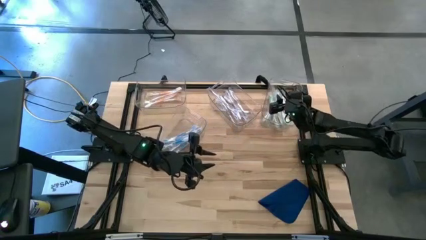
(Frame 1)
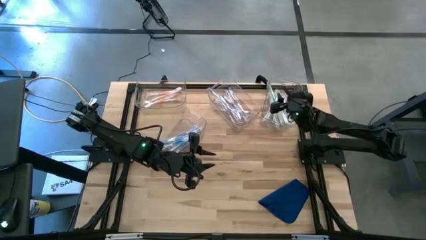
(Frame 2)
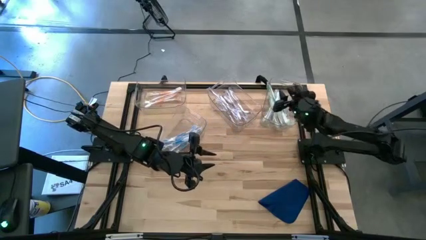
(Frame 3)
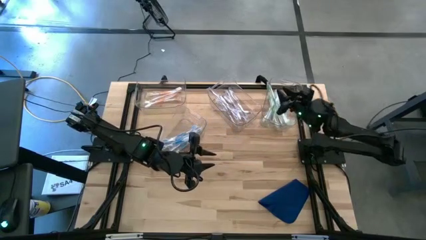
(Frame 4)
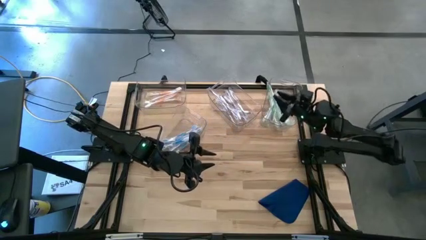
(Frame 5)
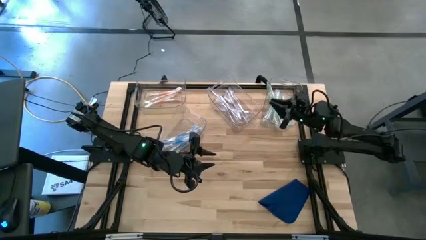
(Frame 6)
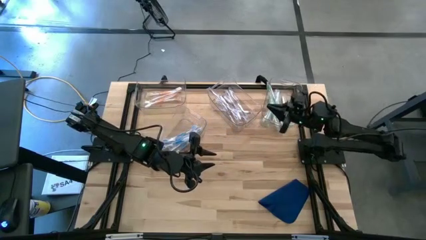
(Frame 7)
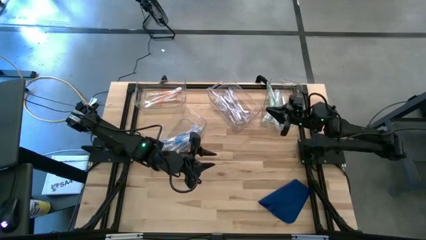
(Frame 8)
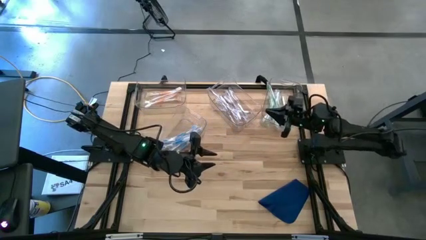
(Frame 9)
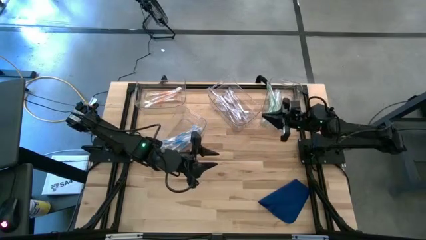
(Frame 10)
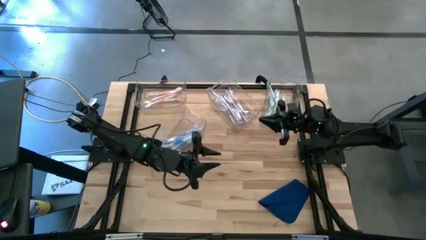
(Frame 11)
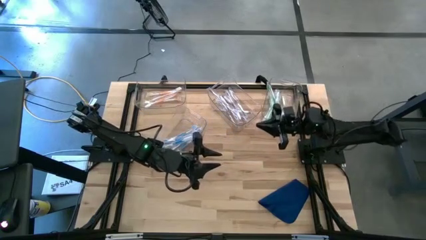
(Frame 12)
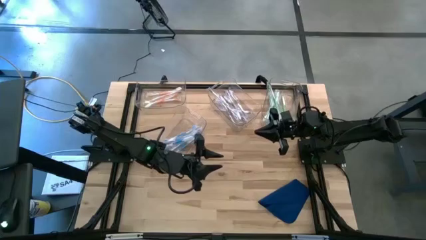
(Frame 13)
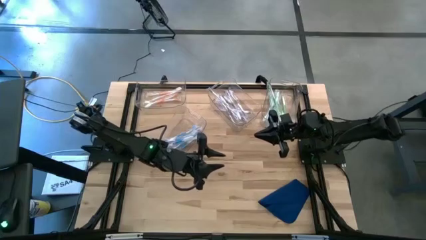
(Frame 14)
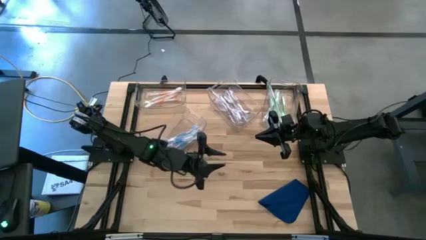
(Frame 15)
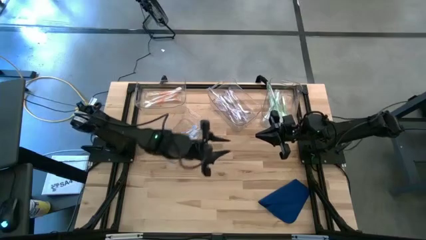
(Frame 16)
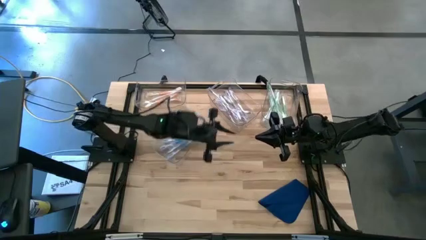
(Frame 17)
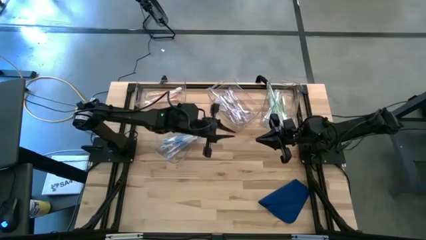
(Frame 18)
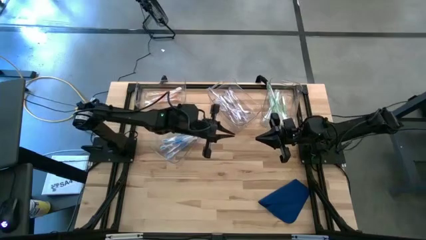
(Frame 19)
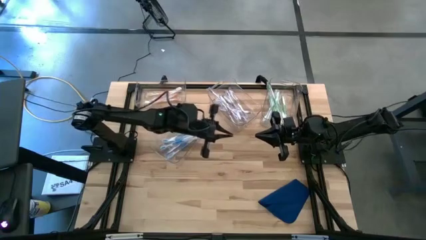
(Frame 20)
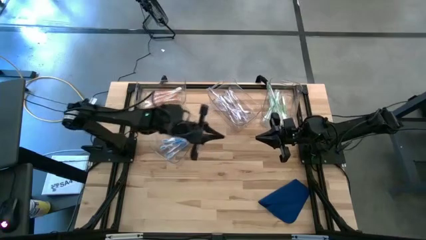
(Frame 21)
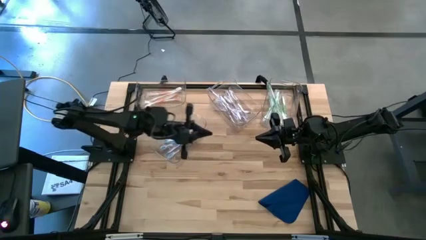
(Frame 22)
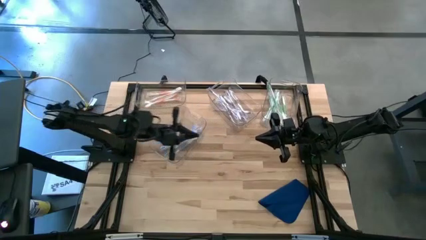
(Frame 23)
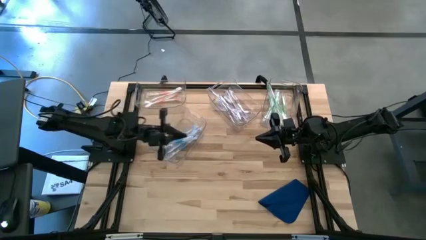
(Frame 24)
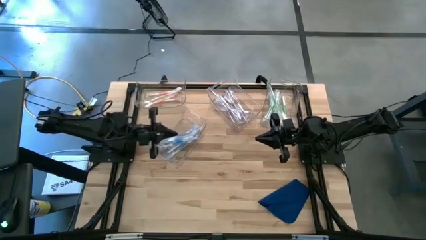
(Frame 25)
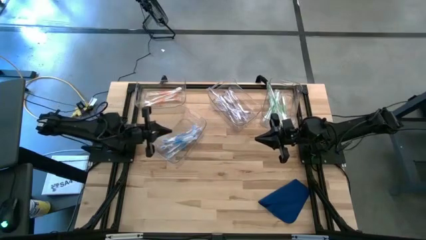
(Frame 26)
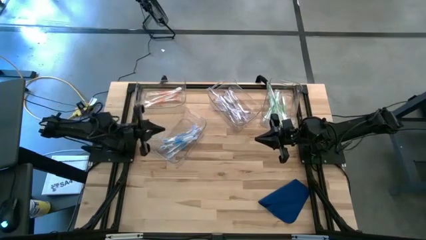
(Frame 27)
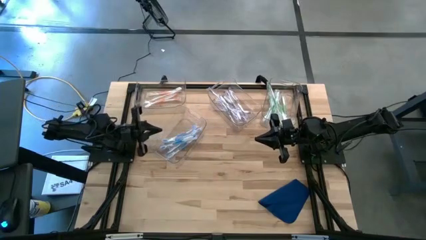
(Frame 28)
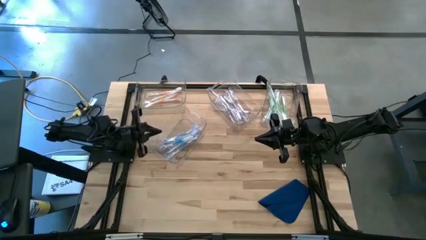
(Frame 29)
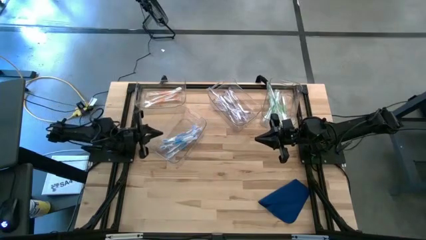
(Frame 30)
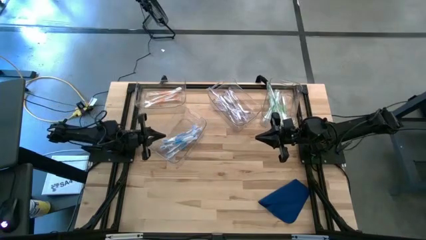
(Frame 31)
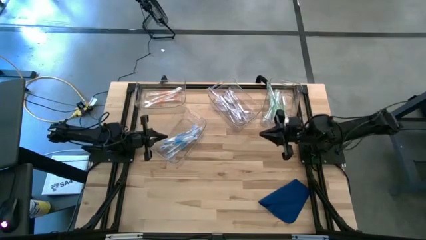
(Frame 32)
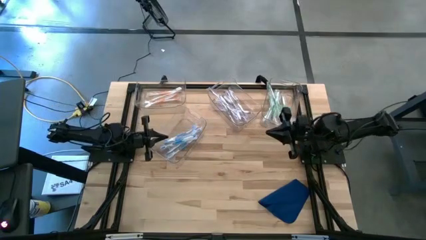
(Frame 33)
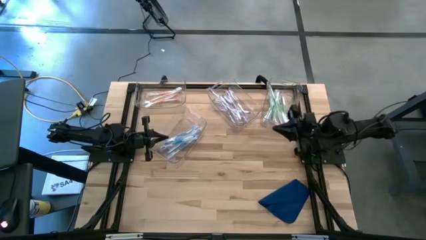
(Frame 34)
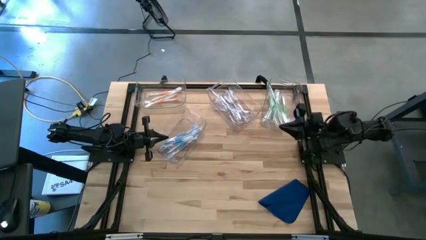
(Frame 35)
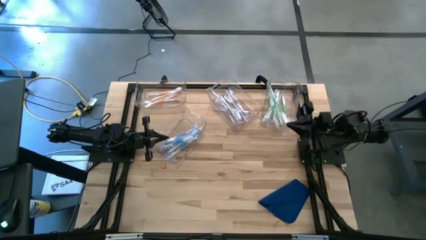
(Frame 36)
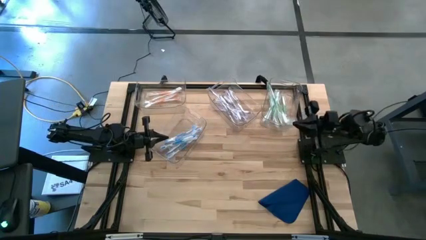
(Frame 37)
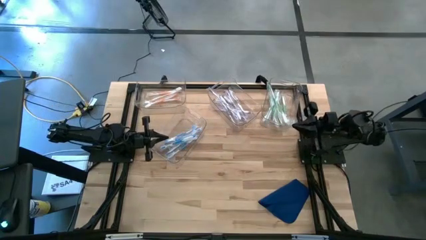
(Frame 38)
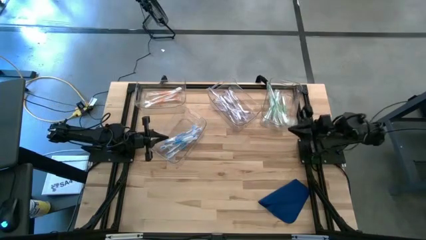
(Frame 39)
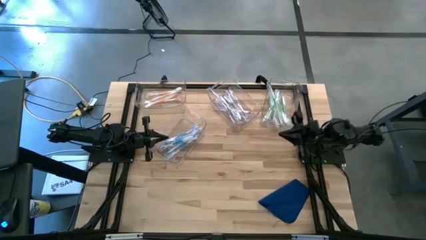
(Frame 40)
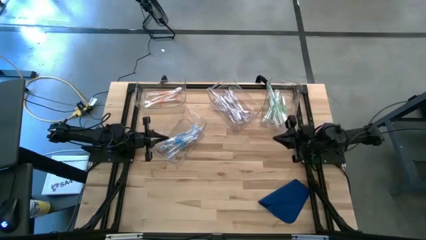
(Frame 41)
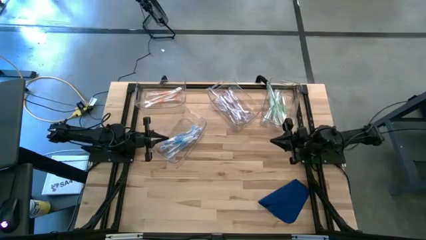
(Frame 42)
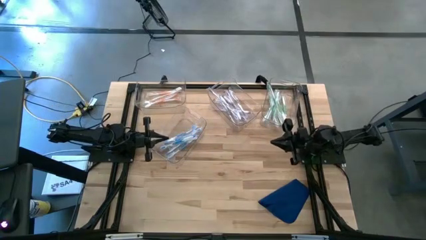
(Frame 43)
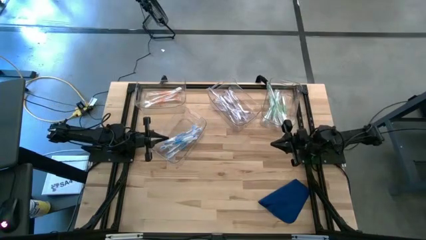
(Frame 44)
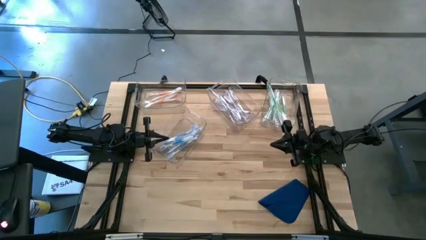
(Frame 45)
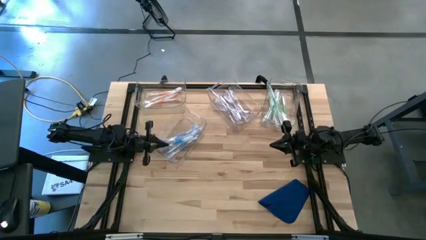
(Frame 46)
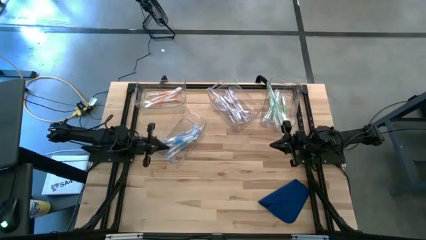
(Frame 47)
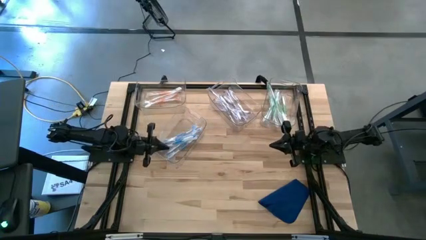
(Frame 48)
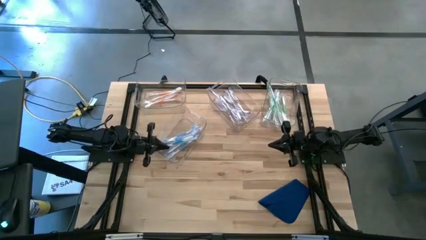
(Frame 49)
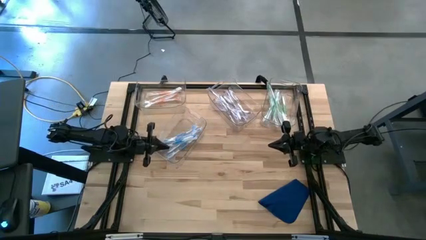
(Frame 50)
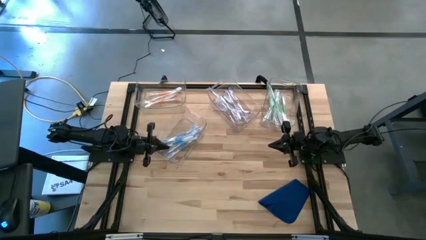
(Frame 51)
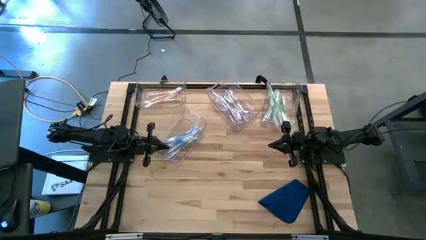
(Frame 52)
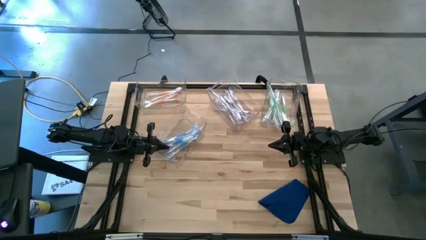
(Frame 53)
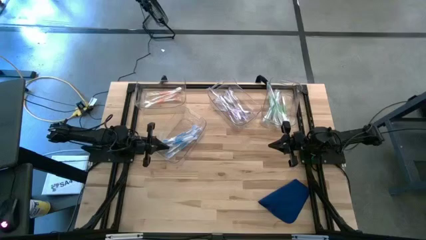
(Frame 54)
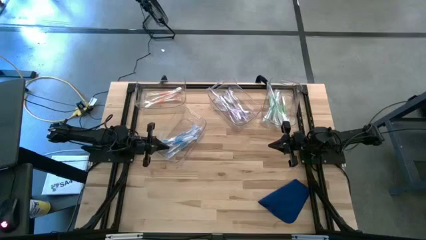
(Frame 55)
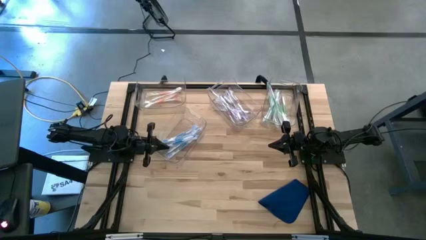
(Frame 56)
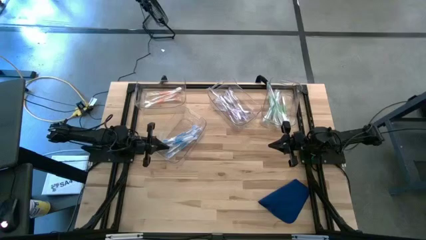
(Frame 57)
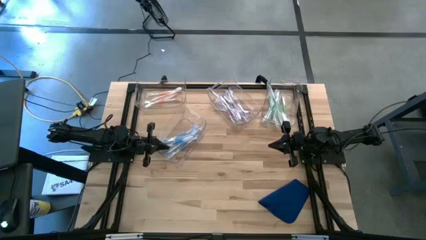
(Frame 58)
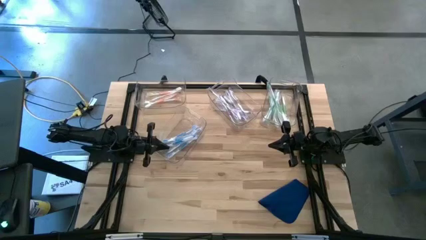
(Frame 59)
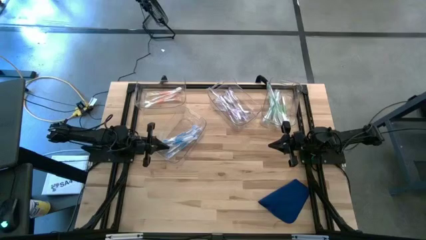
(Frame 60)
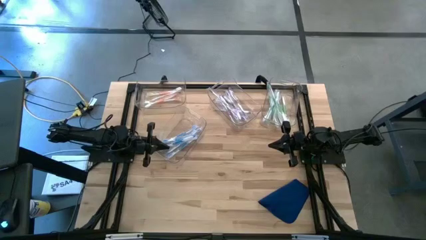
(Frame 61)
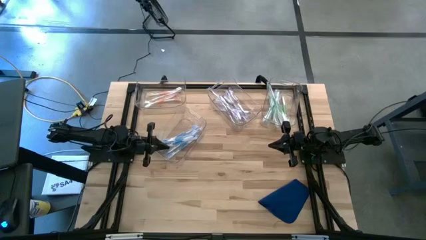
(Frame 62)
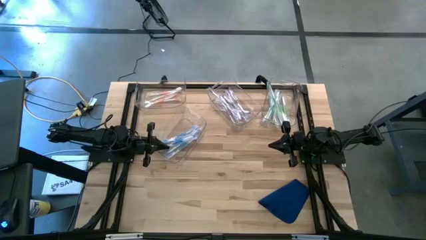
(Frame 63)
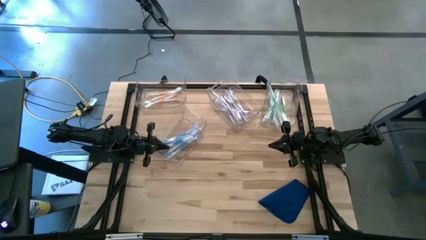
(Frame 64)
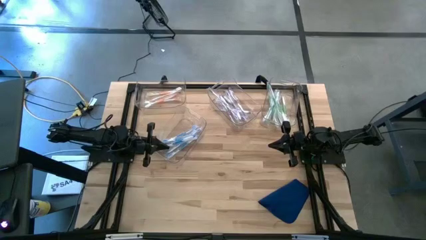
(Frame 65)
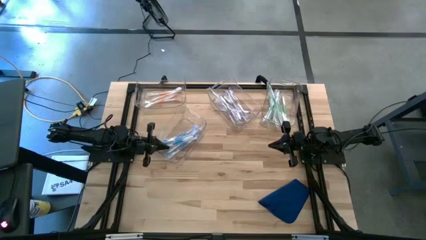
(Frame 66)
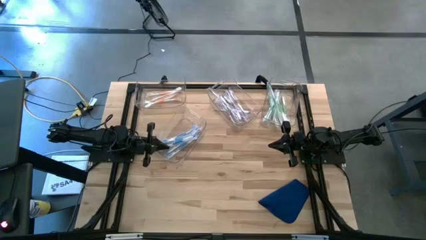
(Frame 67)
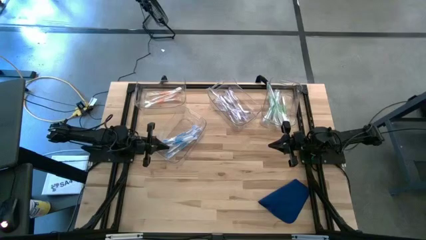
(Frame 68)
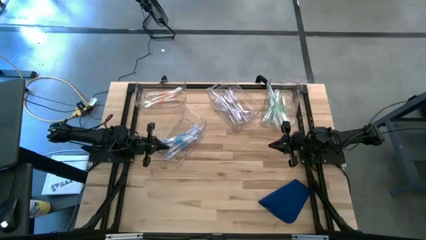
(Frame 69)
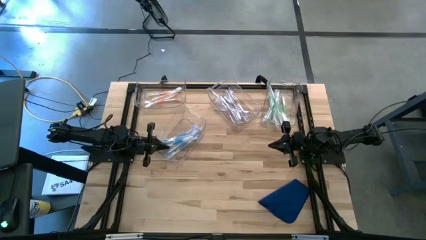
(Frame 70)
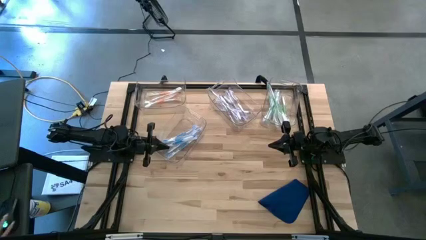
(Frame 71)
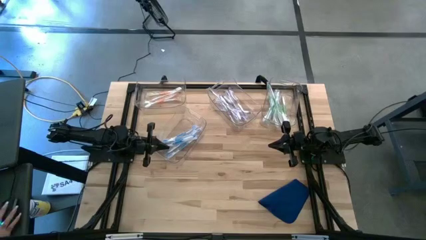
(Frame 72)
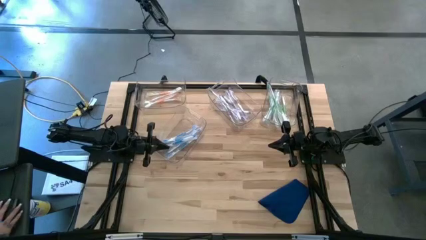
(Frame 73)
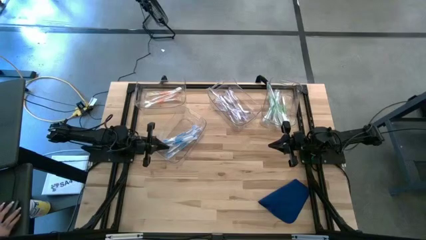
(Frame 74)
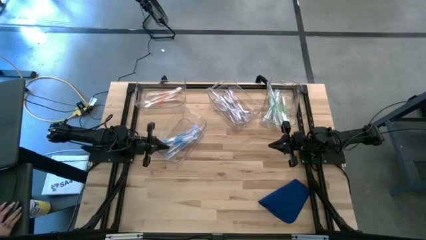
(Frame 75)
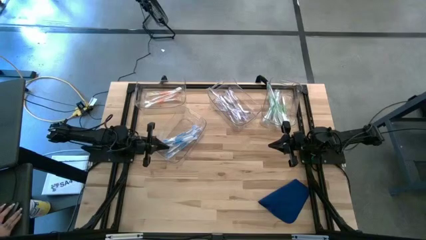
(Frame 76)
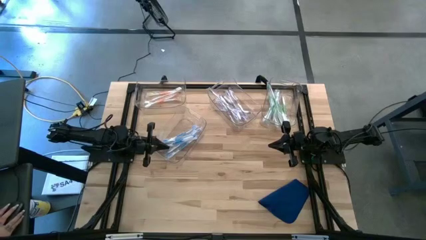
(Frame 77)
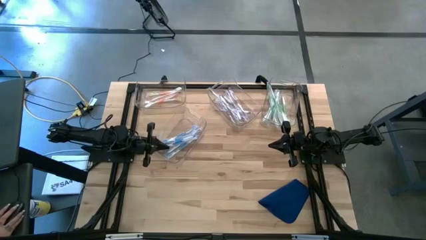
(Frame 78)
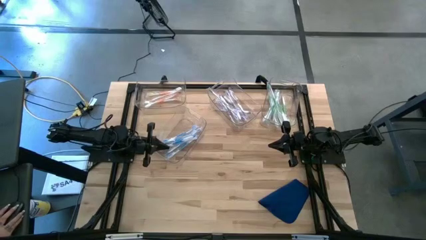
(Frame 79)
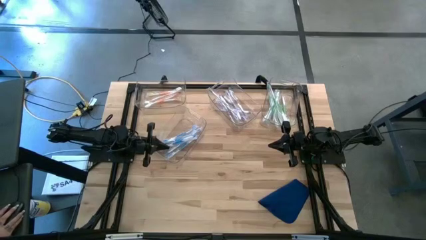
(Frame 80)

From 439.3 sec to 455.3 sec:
Task: Pick & Place Toothbrushes
Return to Home Position
